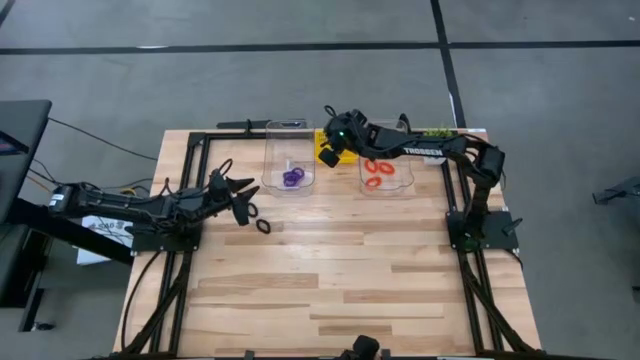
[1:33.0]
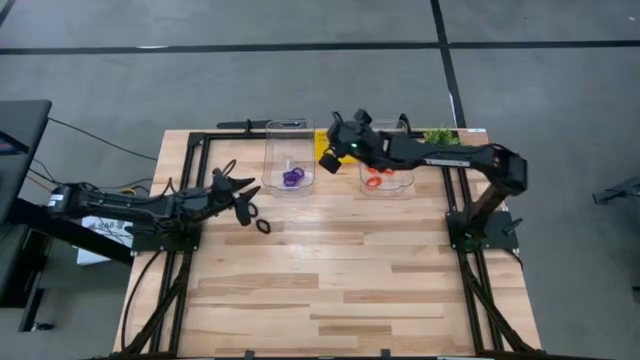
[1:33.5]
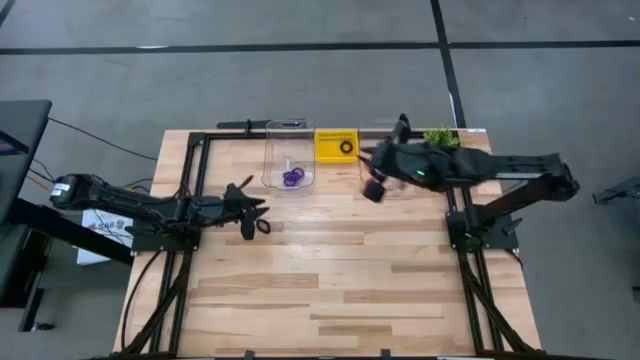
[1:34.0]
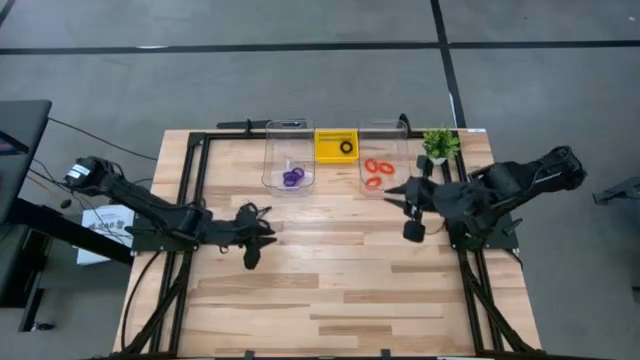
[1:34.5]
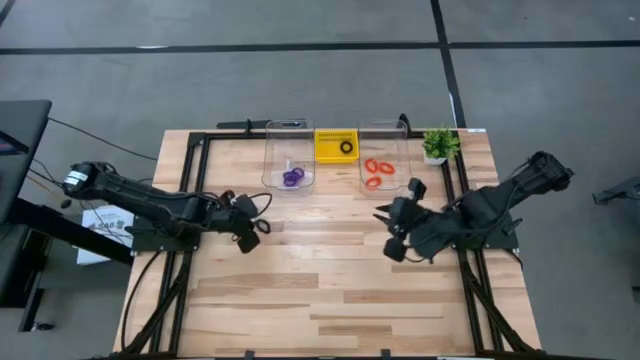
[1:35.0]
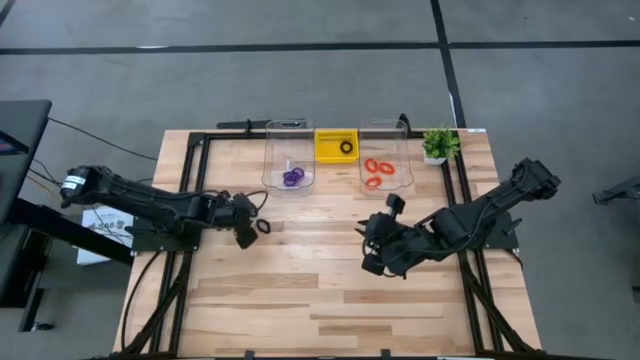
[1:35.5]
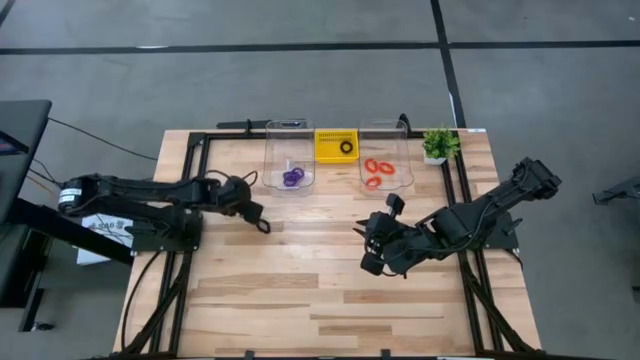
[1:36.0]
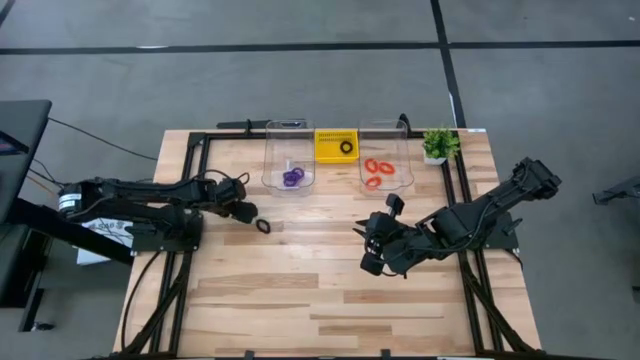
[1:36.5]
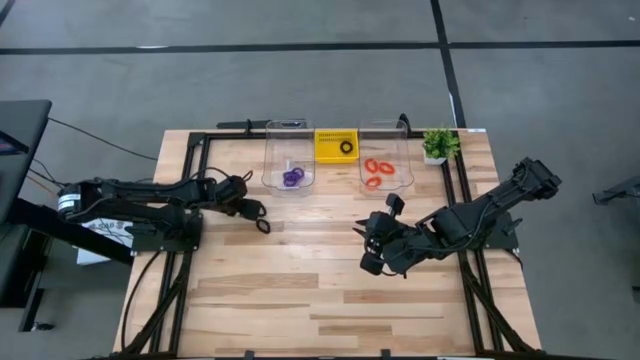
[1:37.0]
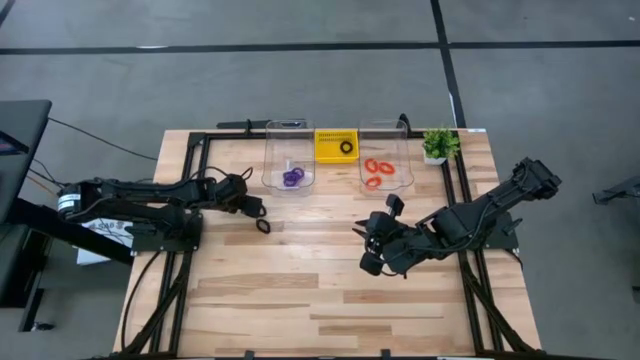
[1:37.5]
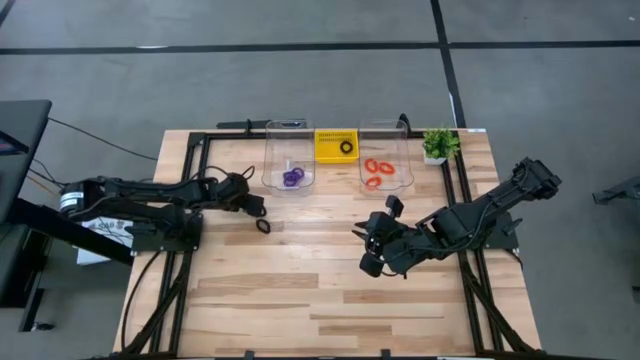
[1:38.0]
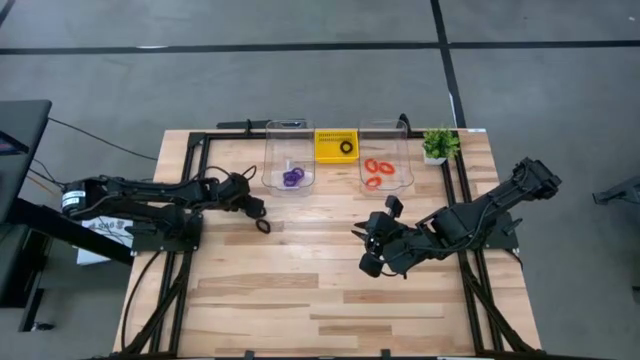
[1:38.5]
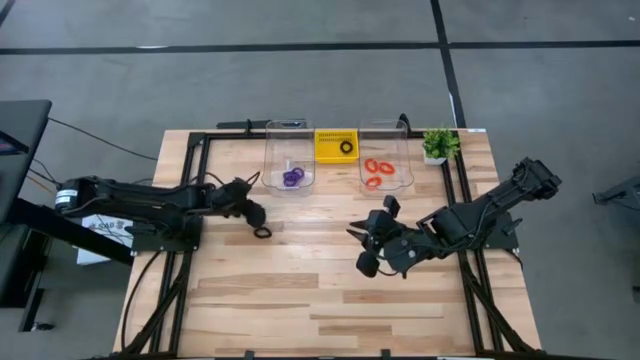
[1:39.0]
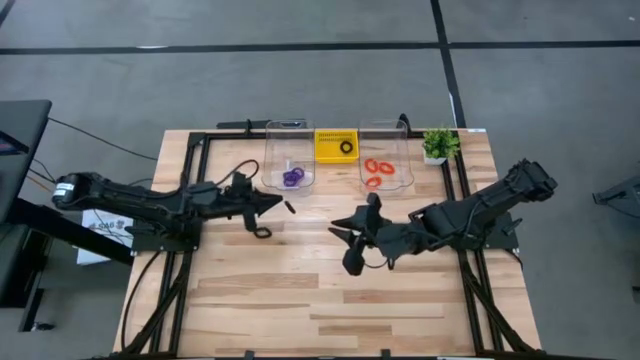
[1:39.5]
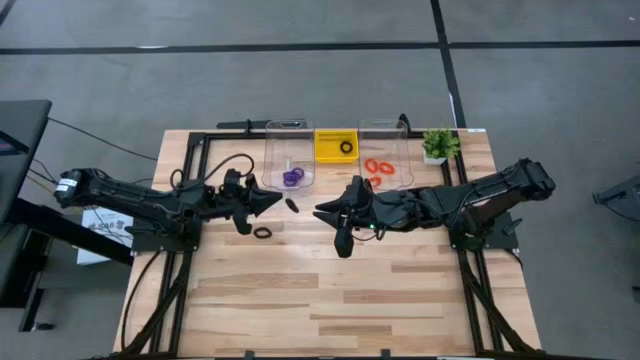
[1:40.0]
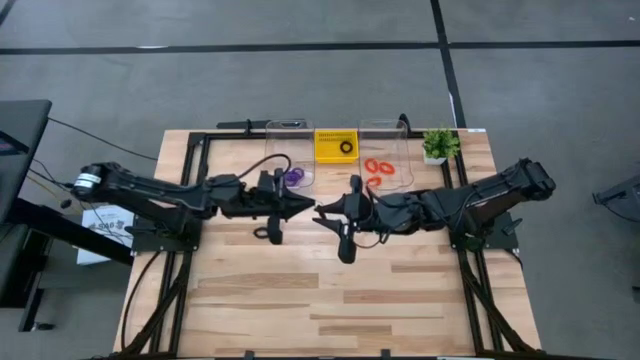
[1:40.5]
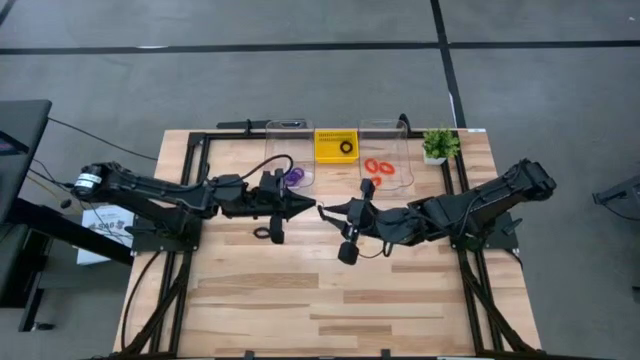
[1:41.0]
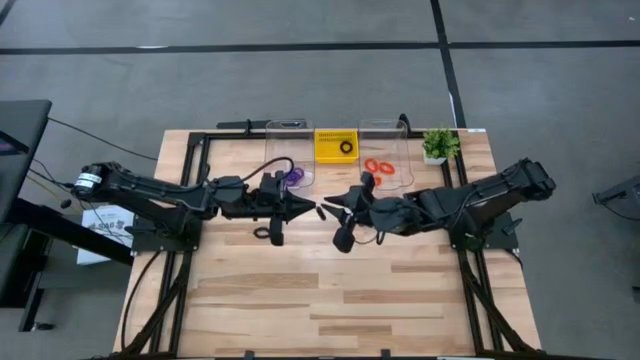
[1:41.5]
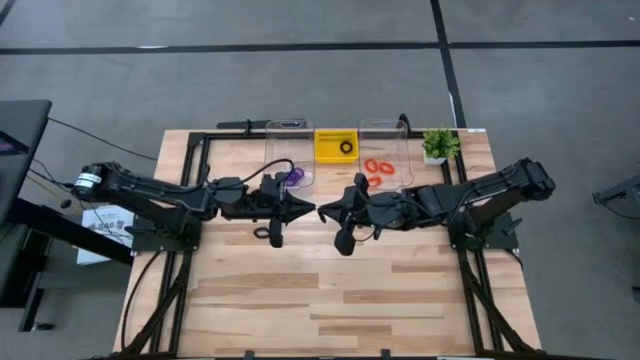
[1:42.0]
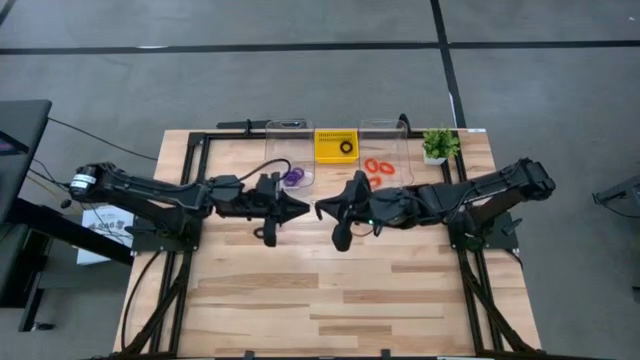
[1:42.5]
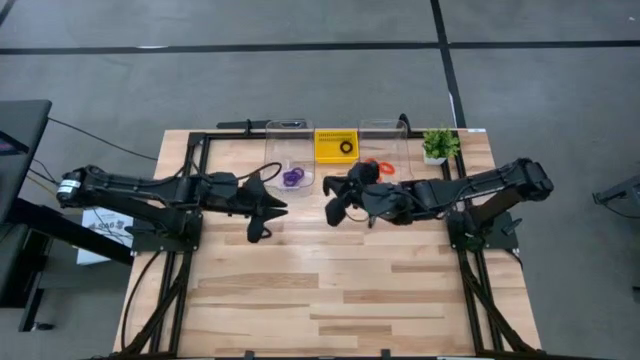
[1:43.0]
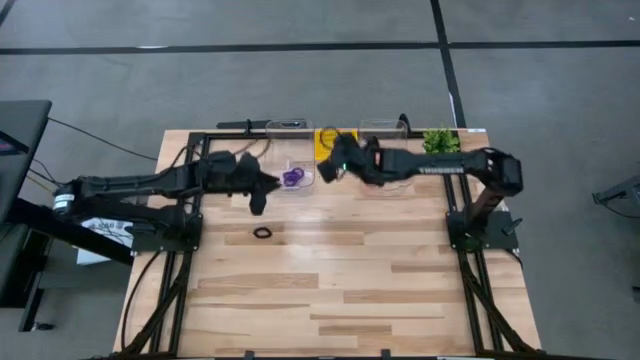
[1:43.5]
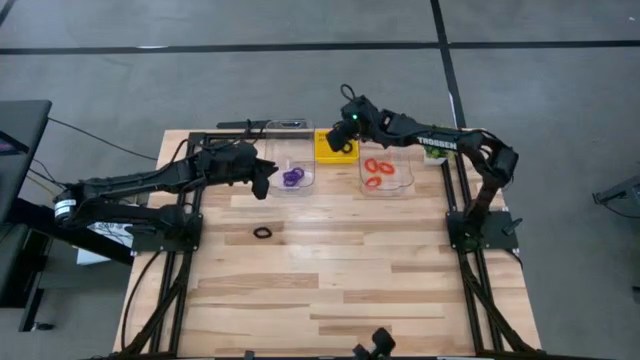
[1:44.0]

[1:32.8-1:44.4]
Task: Sort spring keychains
Put the top black spring keychain into the yellow bin

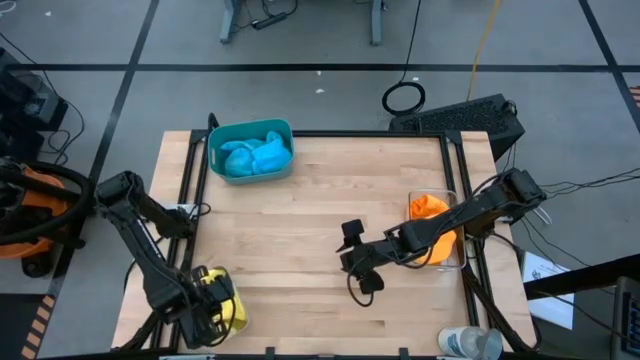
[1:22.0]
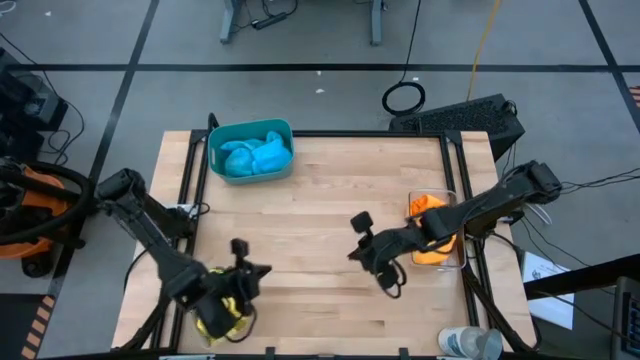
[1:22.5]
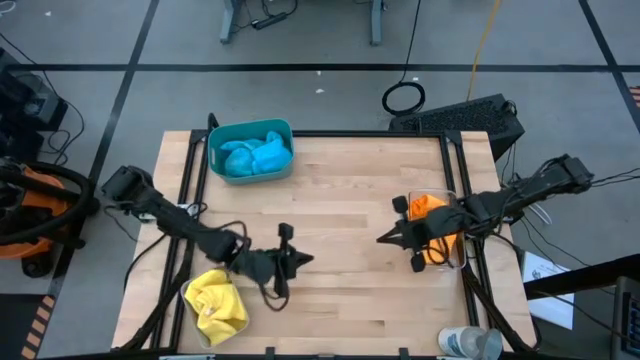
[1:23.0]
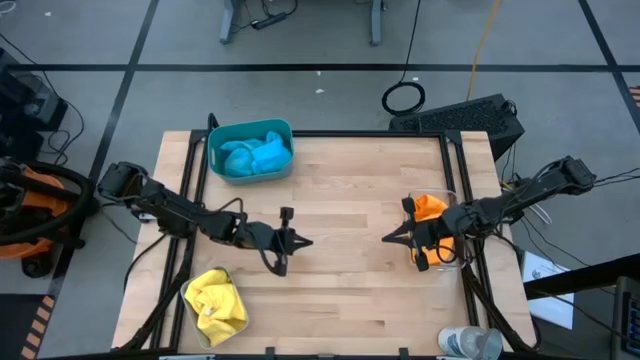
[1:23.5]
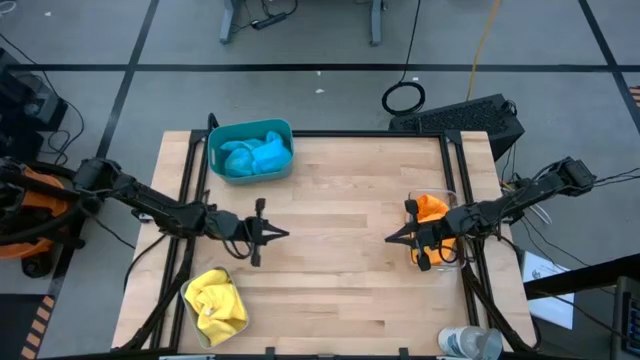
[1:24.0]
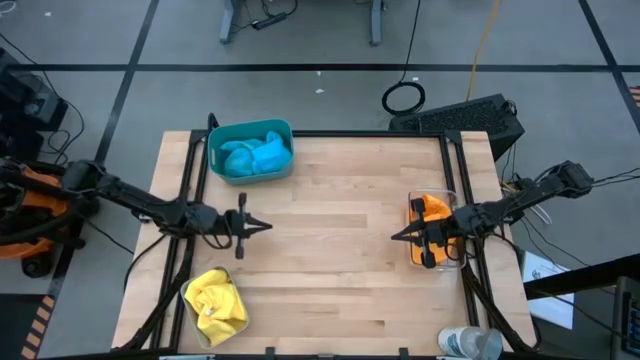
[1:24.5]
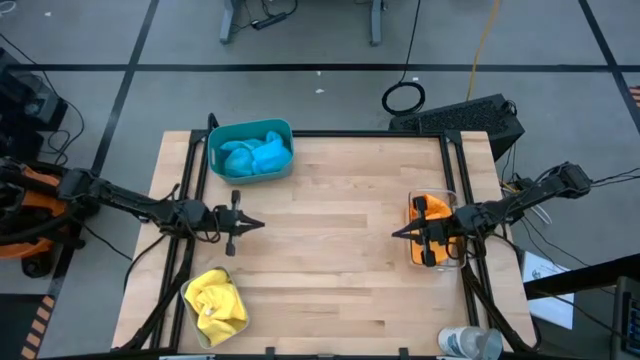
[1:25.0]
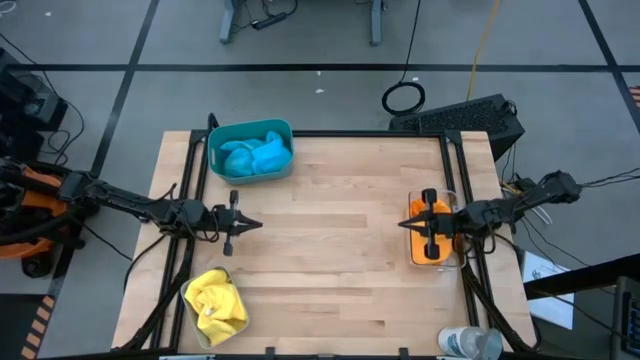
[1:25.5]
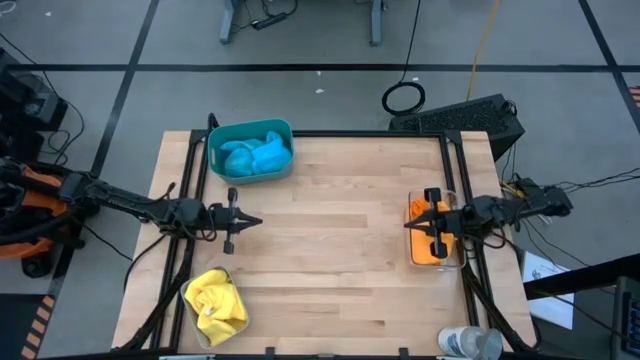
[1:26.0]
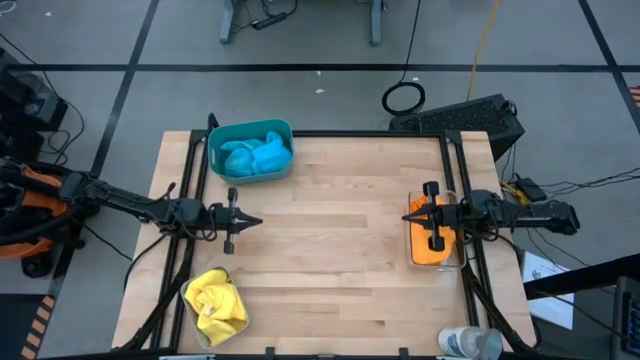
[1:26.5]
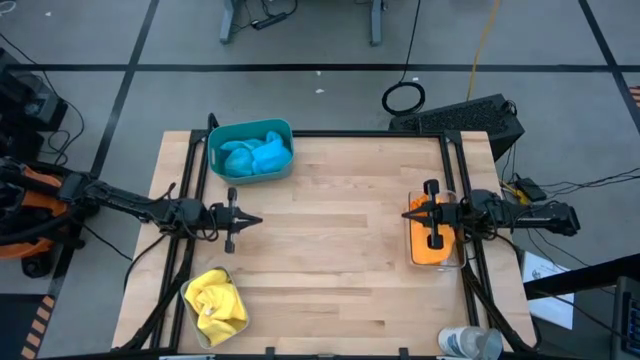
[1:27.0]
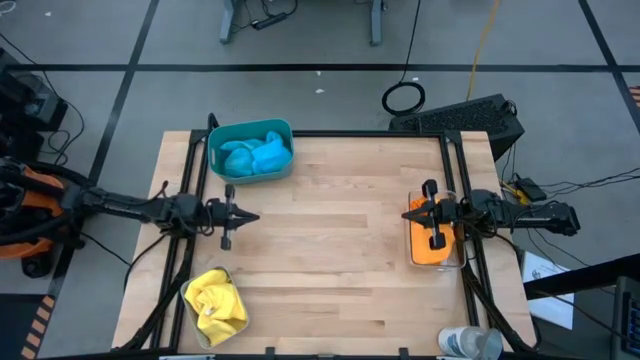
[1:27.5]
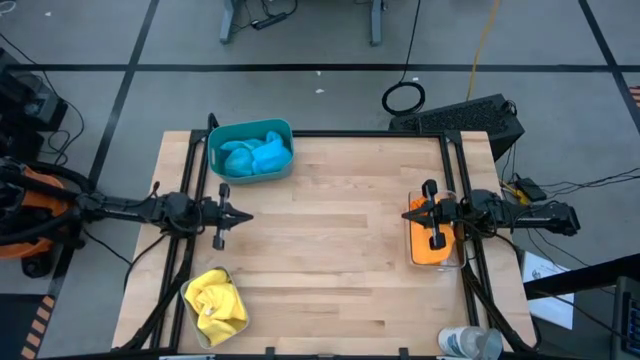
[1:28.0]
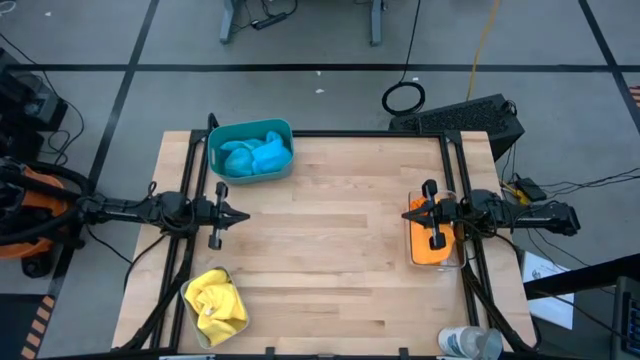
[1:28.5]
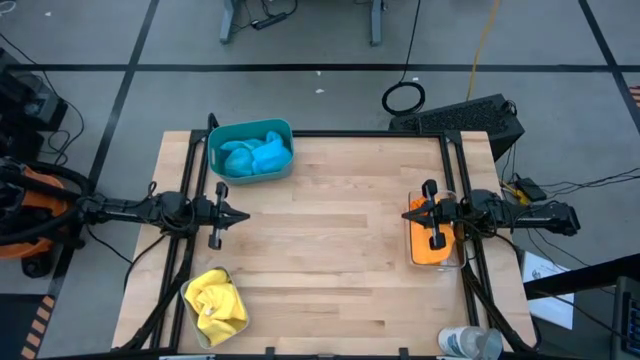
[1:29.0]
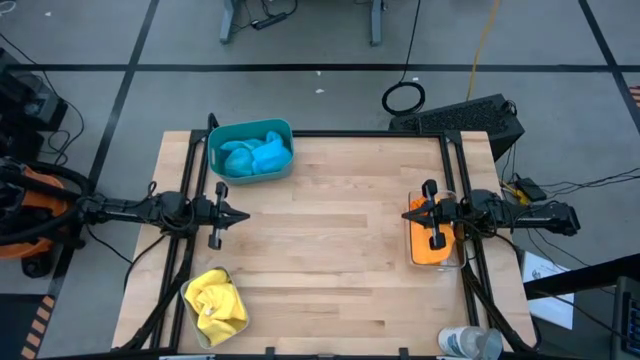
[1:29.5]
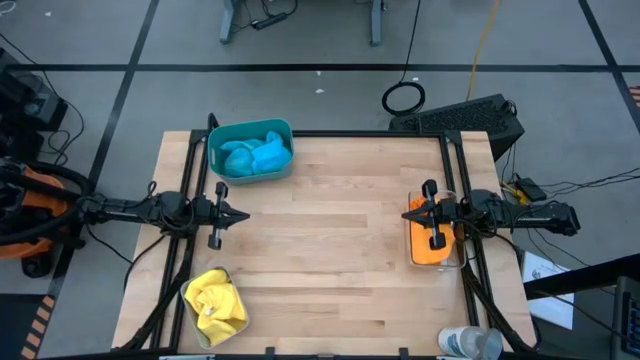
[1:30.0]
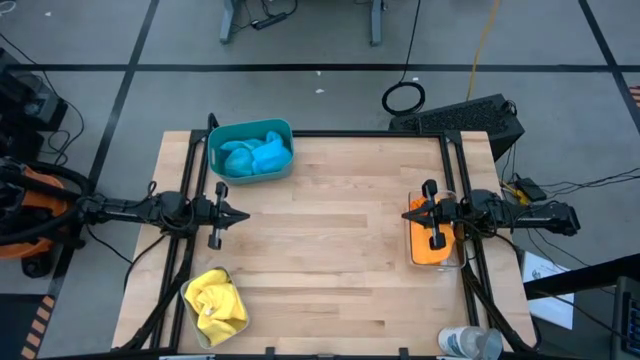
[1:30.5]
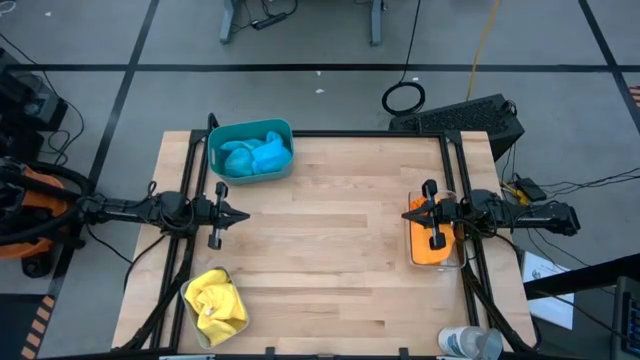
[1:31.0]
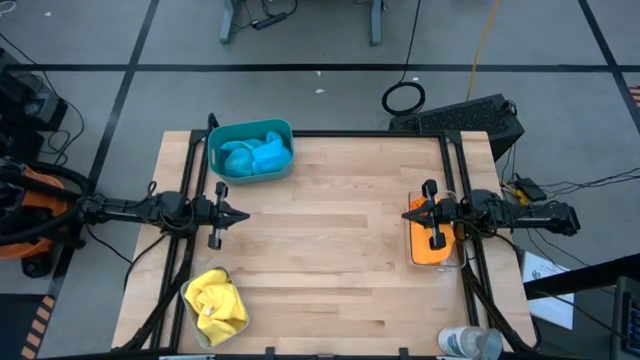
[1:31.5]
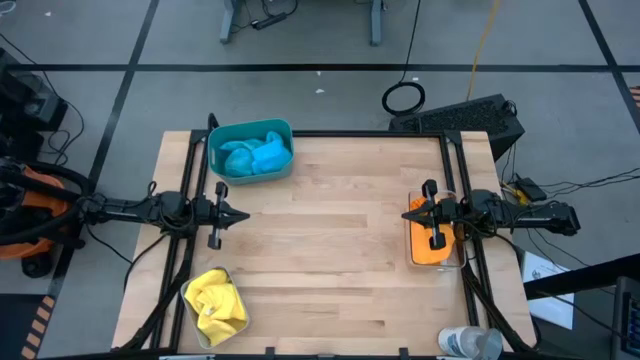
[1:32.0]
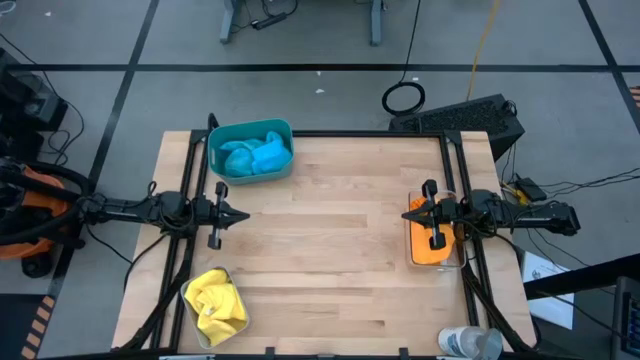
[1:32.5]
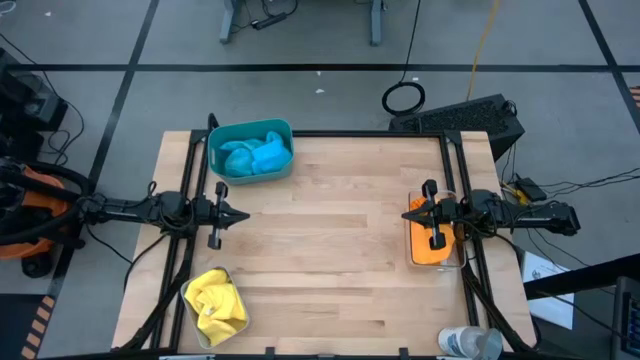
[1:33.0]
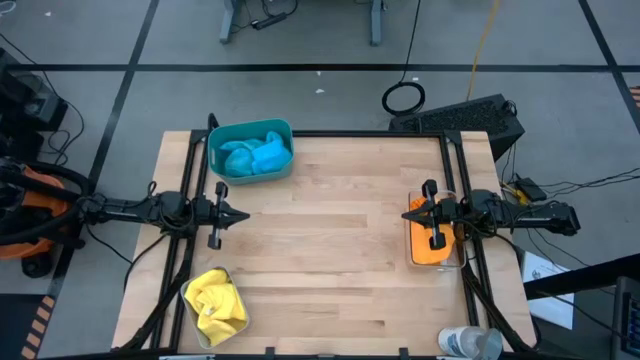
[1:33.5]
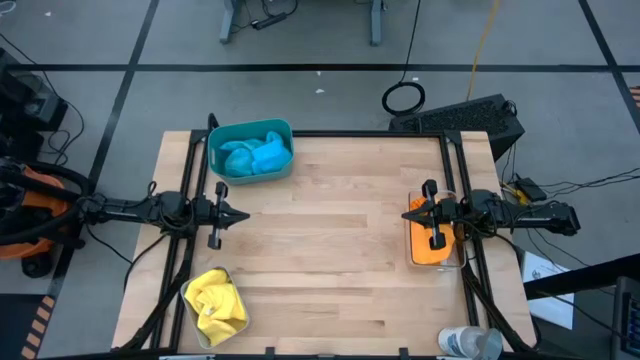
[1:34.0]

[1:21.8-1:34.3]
Task: Sort microfiber towel by color & place in baskets
Return to Home Position
